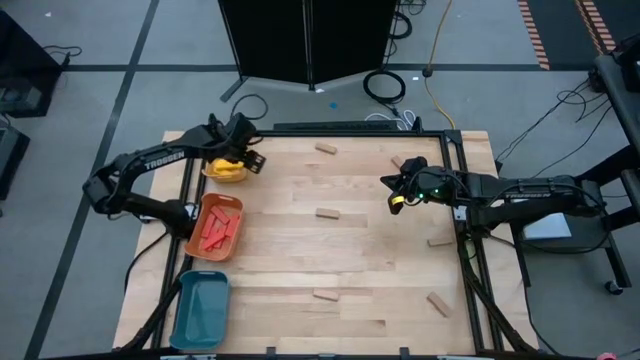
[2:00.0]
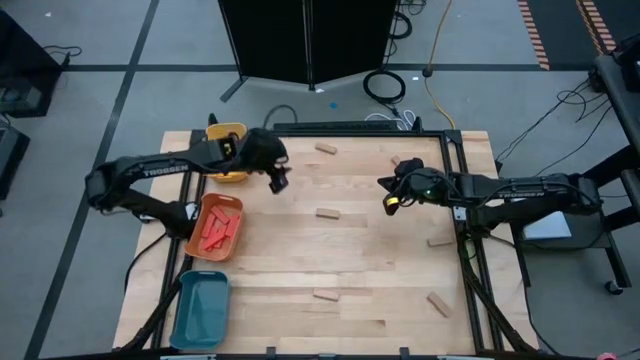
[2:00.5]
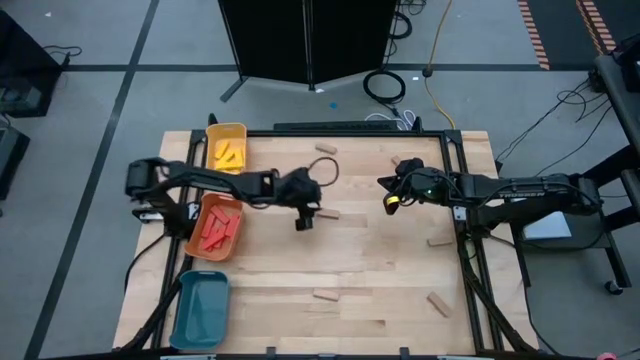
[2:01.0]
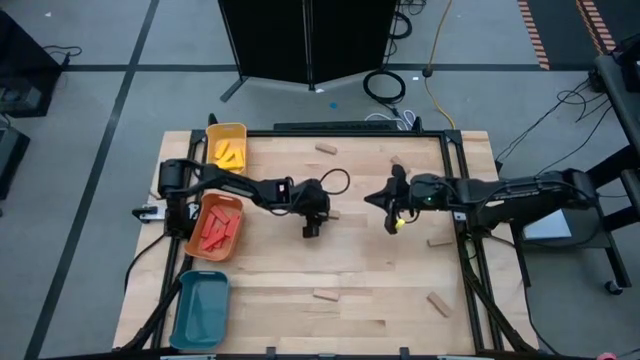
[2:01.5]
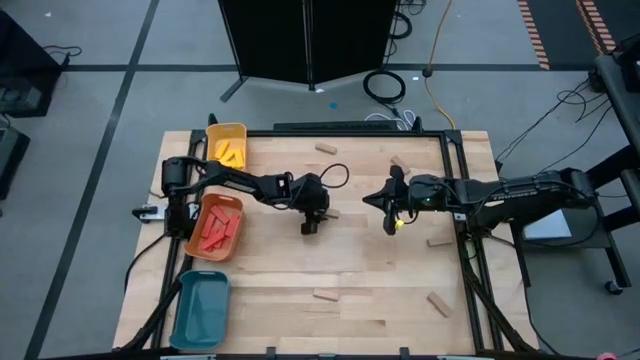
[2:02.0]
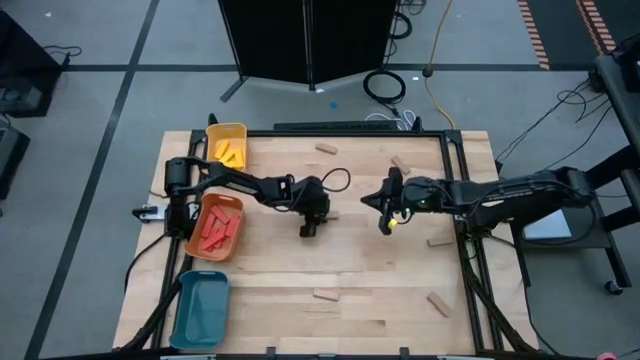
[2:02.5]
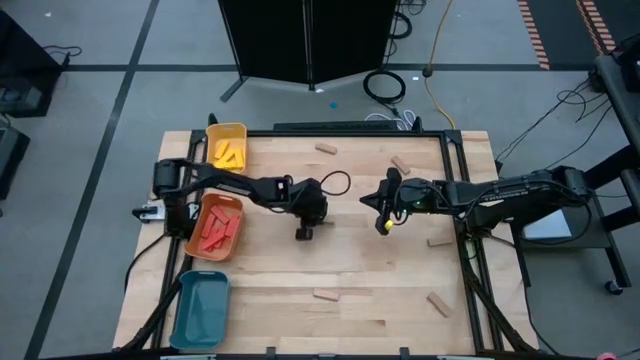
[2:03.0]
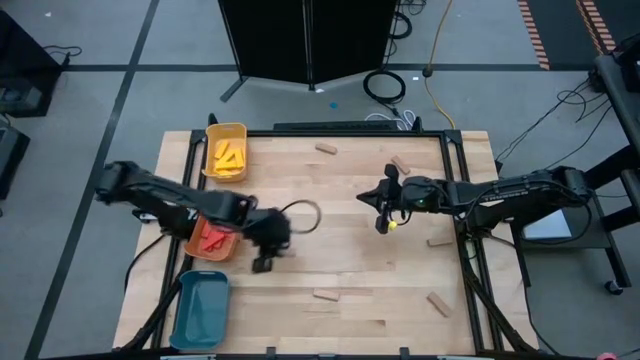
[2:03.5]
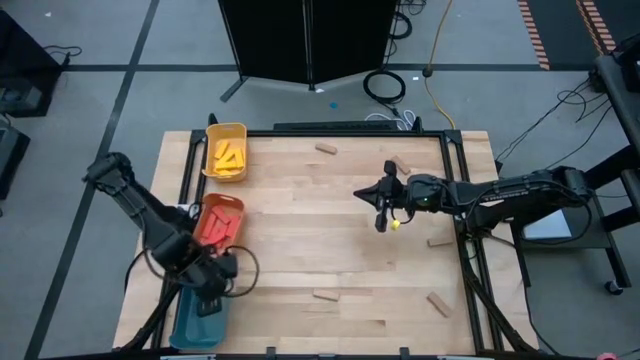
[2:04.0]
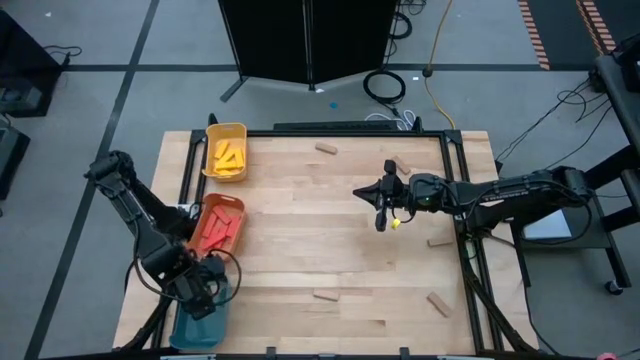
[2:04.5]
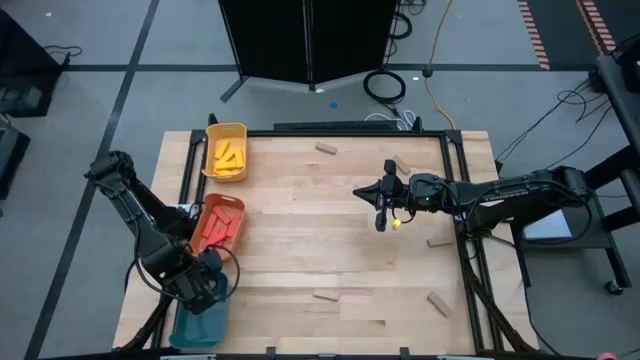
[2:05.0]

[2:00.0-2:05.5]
Task: Sort blocks
Put the middle left brown block in the blue bin

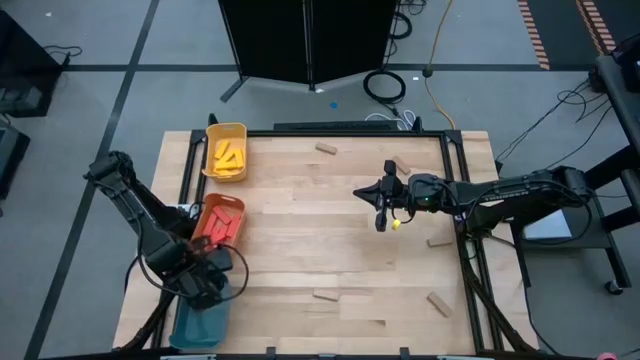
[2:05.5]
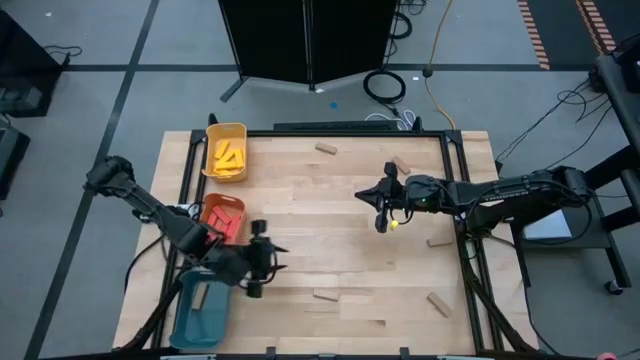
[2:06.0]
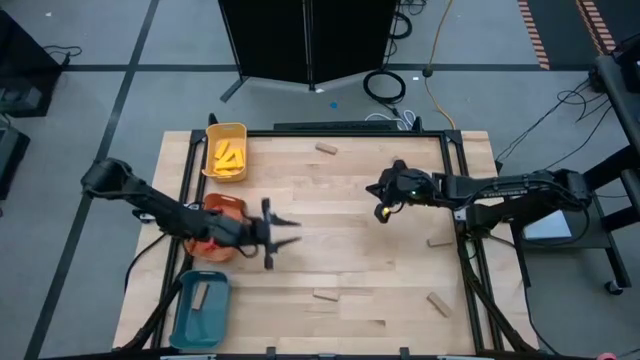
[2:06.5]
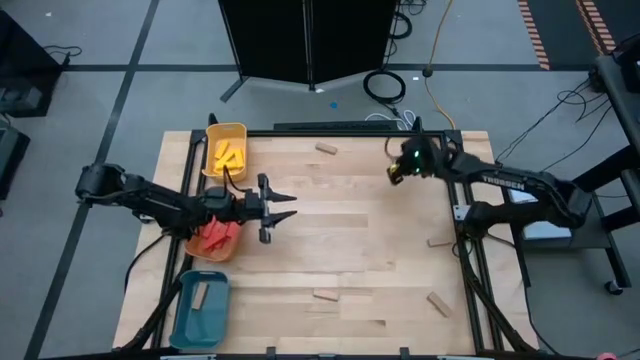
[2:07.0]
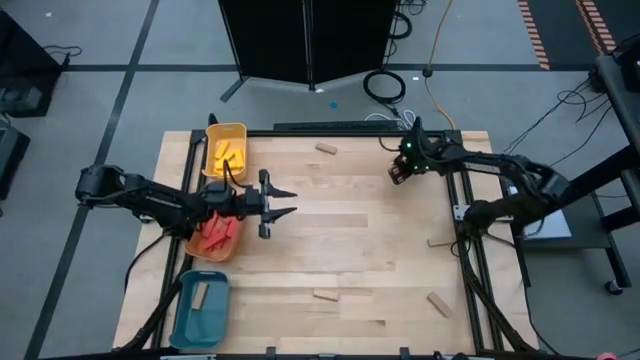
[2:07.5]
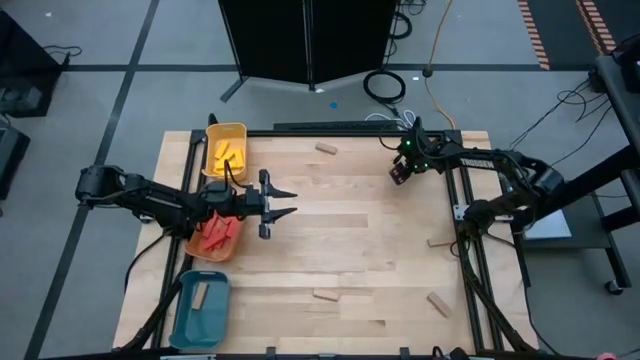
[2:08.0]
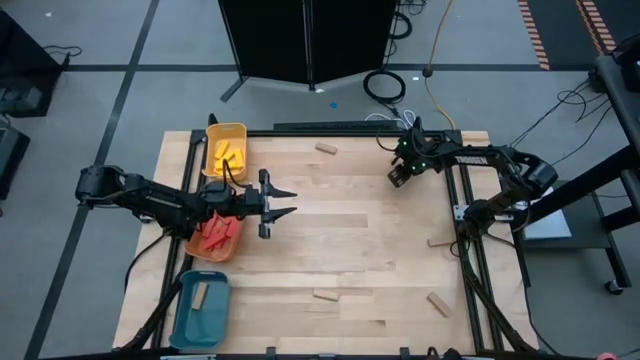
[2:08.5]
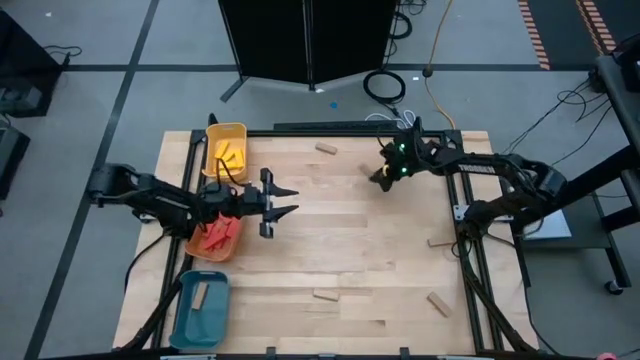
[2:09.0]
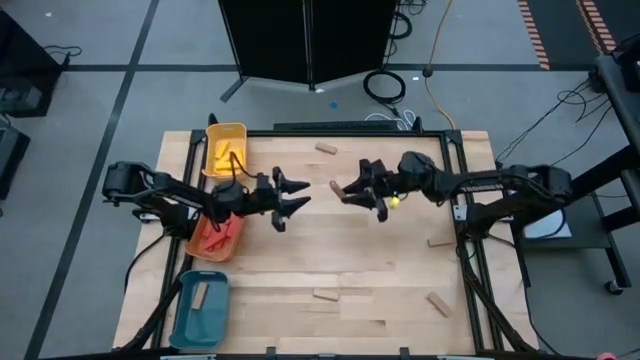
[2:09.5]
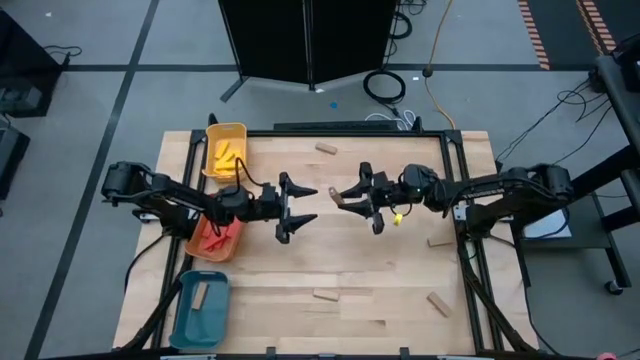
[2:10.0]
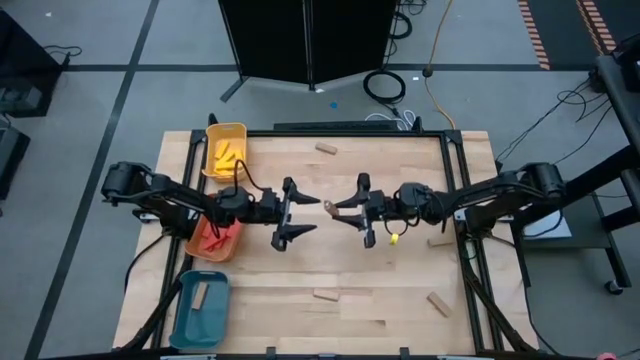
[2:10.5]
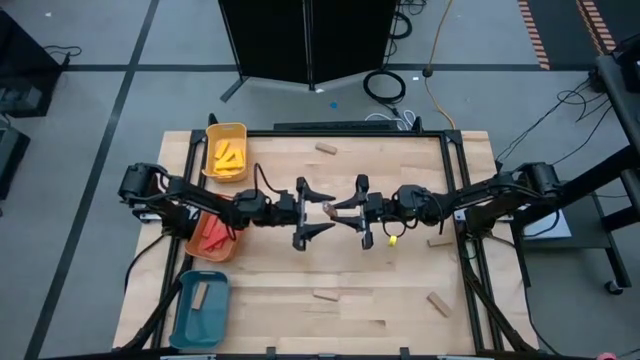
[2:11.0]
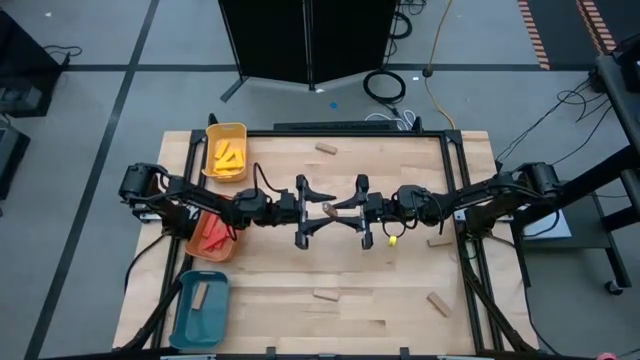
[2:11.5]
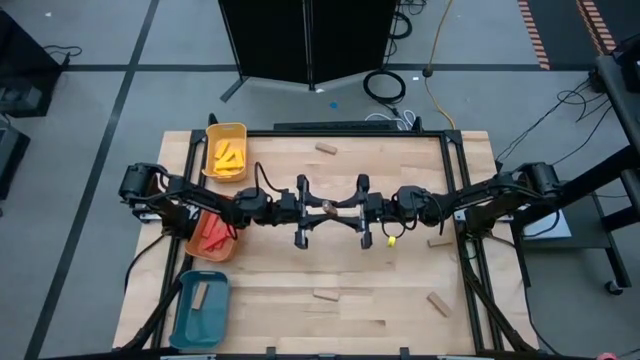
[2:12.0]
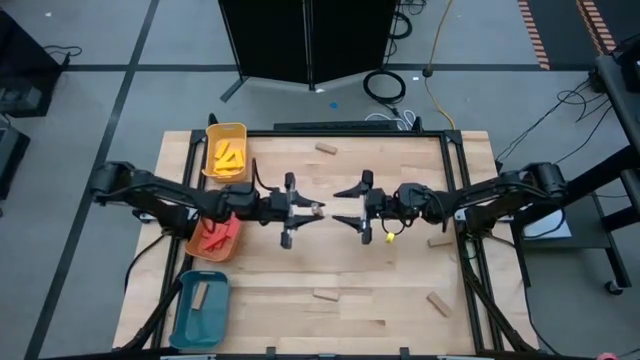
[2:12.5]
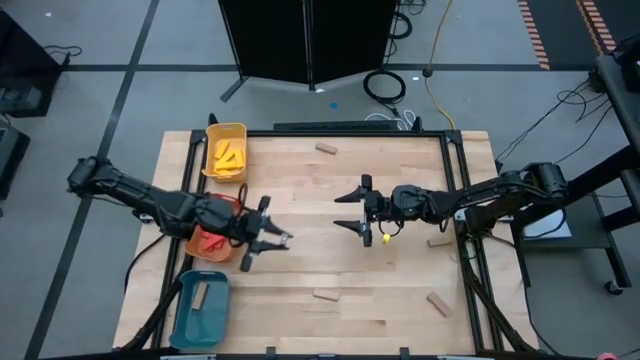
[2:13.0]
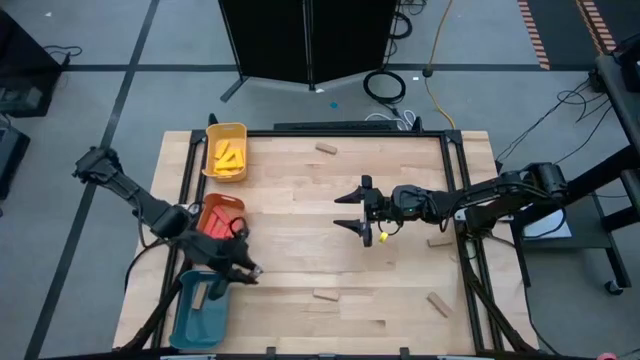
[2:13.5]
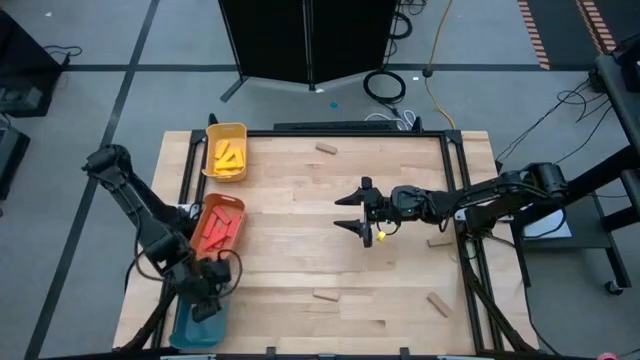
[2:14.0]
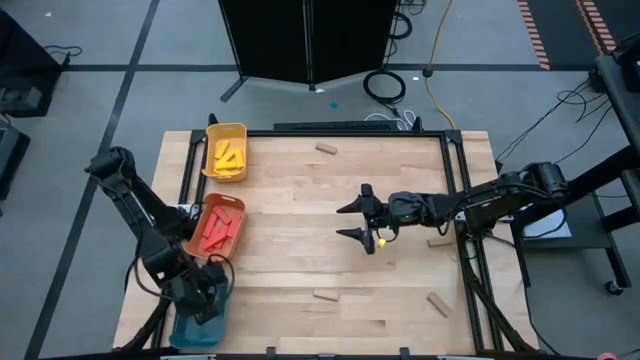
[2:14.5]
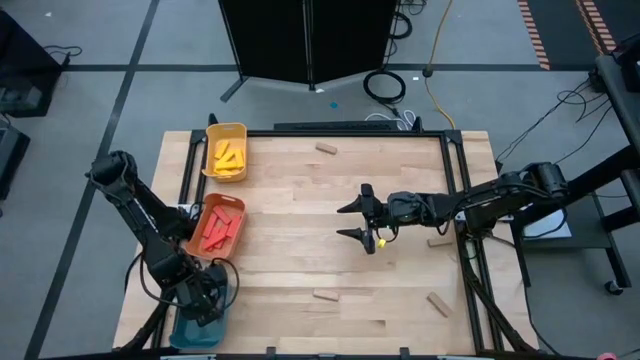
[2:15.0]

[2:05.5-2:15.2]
Put the top right brown block in the blue bin

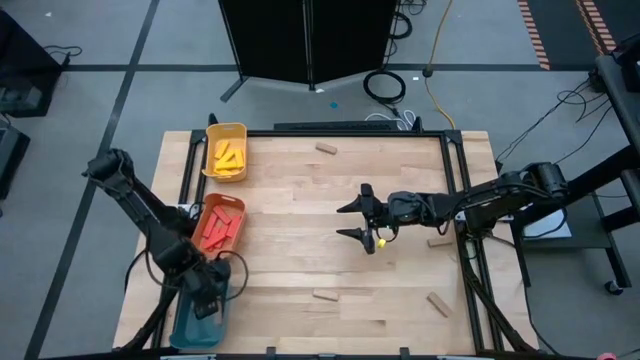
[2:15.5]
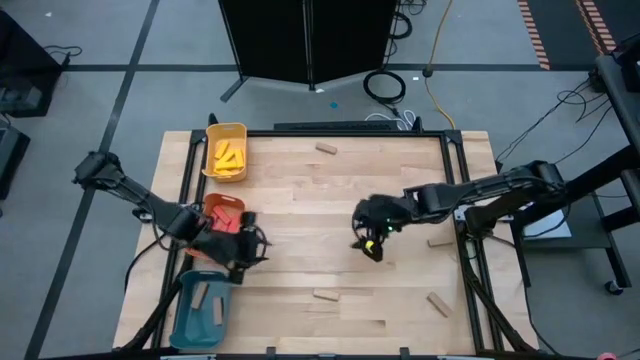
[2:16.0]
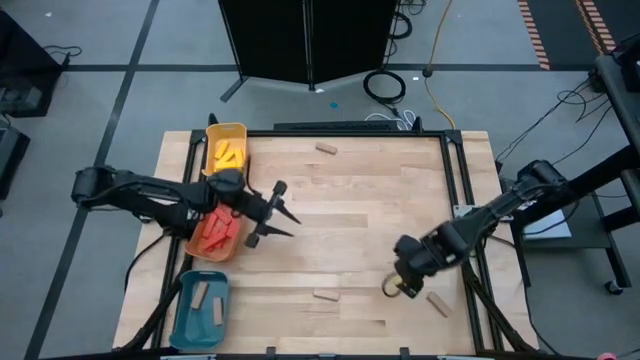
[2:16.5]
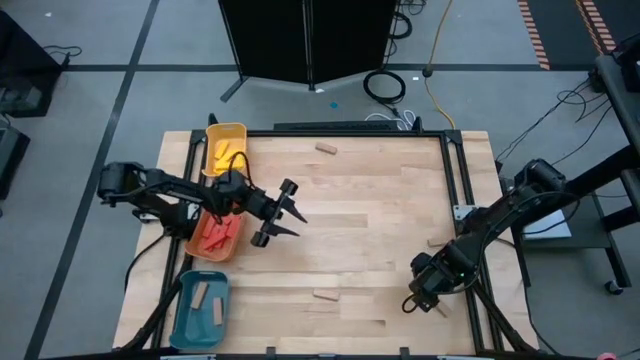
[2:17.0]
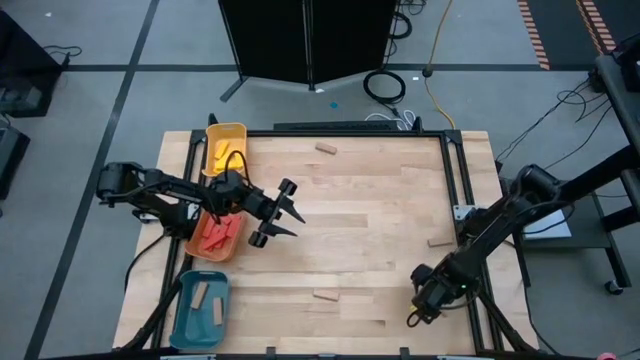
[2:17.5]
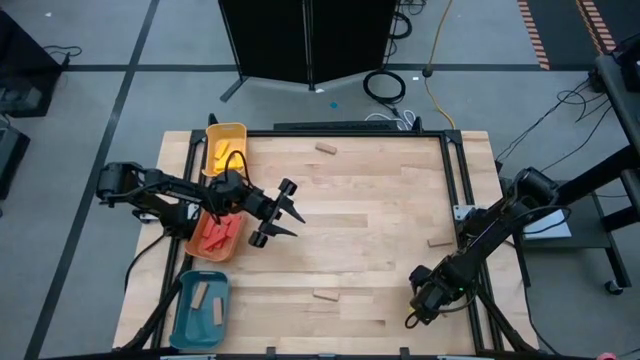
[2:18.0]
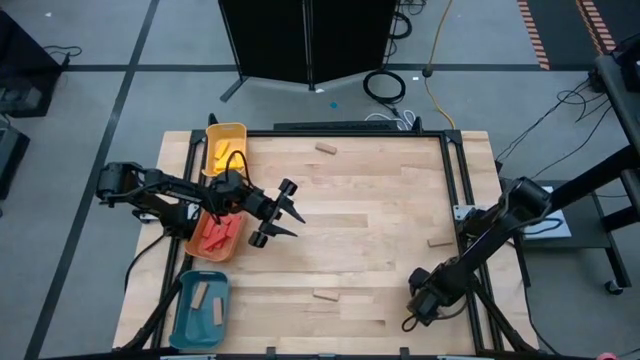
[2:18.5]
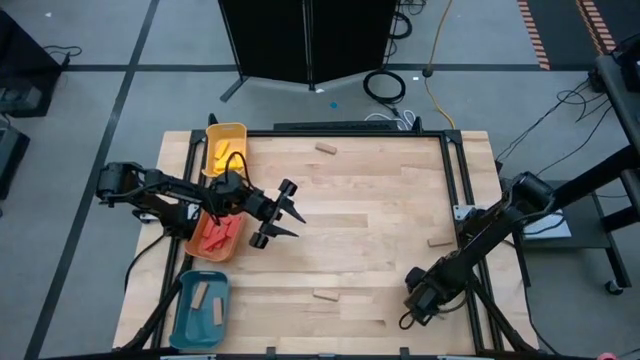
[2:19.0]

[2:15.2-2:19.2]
Put the bottom right brown block in the blue bin

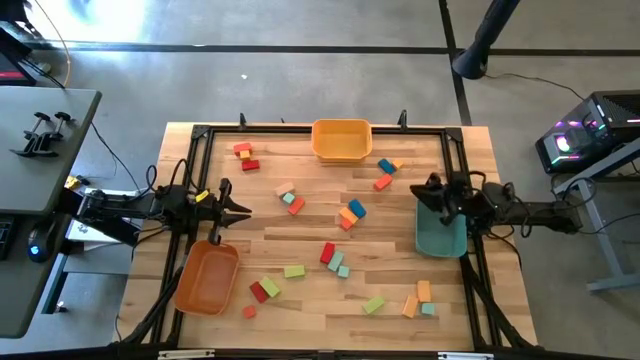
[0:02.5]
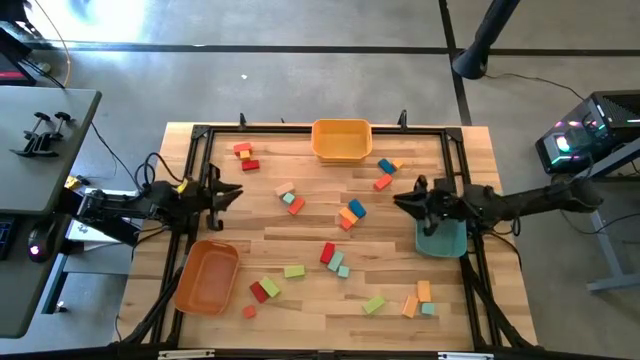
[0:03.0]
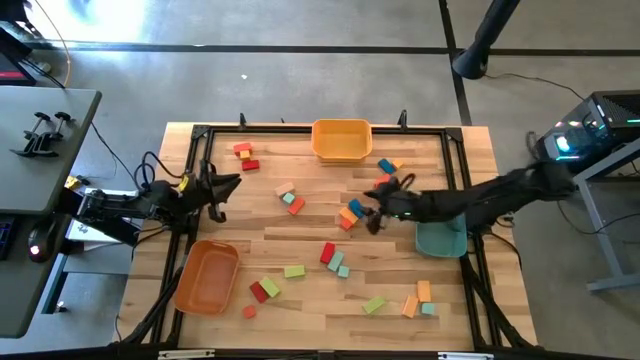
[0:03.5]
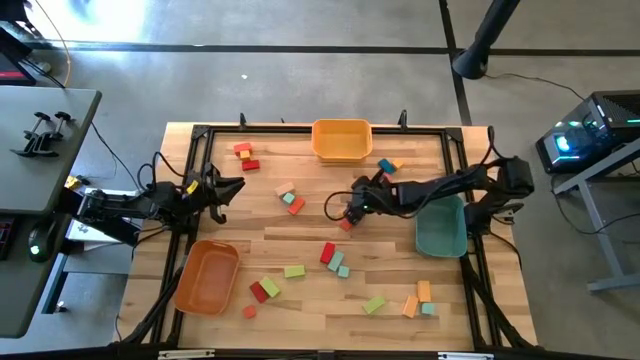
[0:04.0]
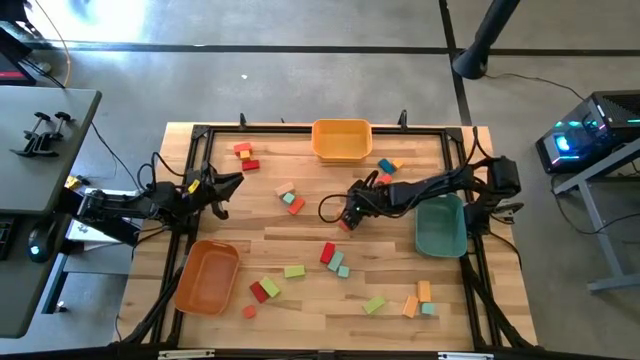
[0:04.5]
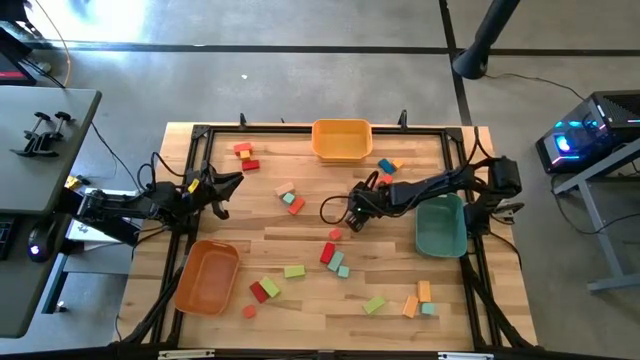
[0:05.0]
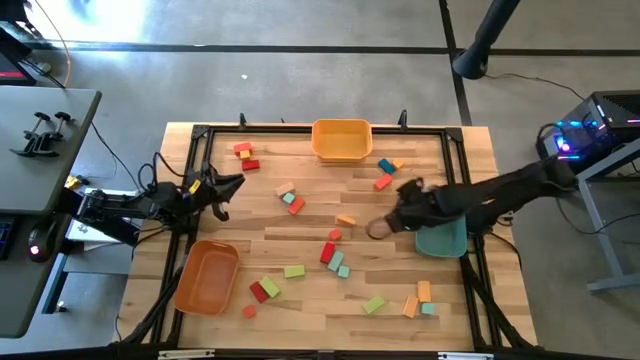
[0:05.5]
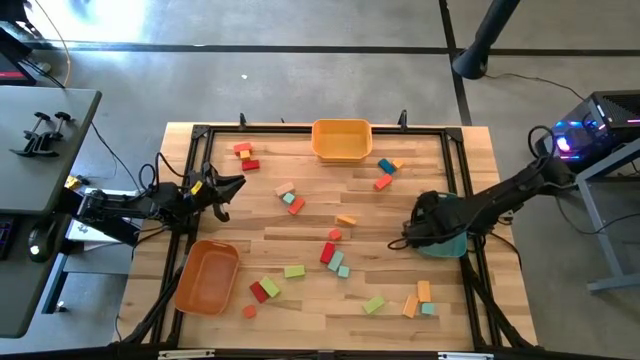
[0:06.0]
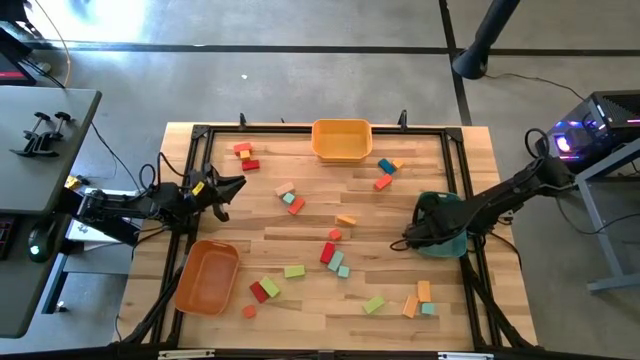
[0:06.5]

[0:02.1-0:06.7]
Task: Sort blocks by size
Put the thick blue rectangular block into the blue bin
